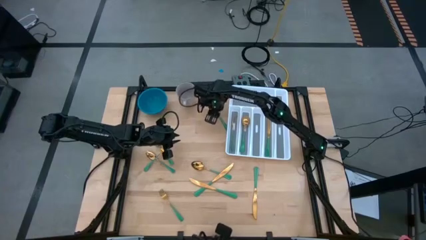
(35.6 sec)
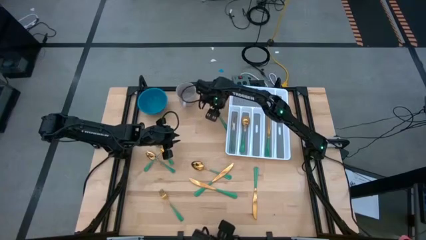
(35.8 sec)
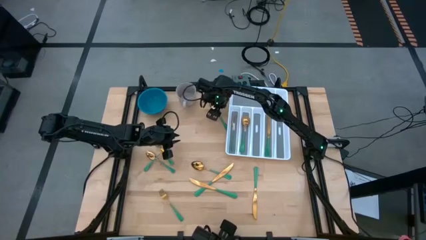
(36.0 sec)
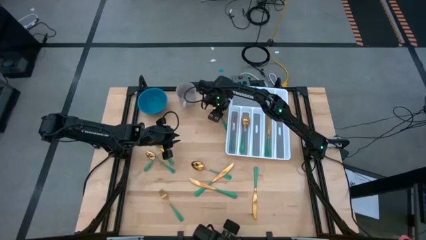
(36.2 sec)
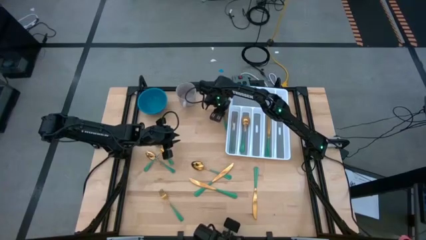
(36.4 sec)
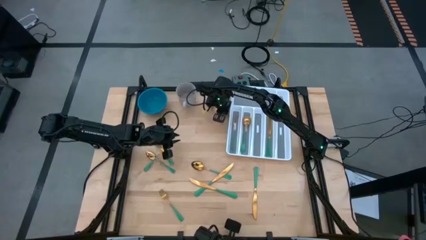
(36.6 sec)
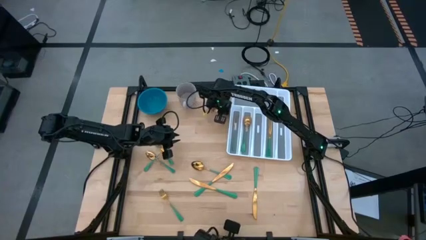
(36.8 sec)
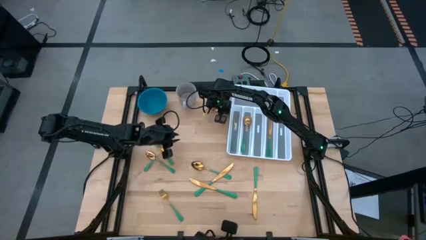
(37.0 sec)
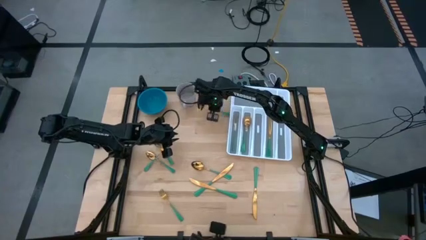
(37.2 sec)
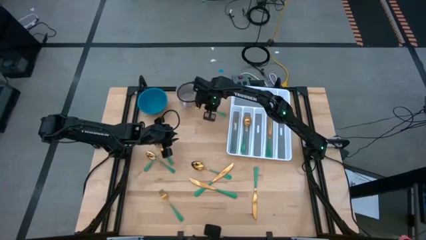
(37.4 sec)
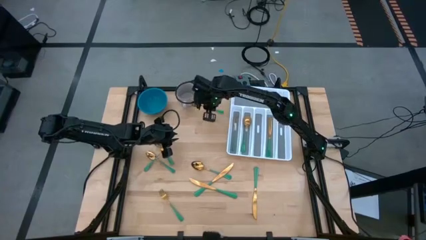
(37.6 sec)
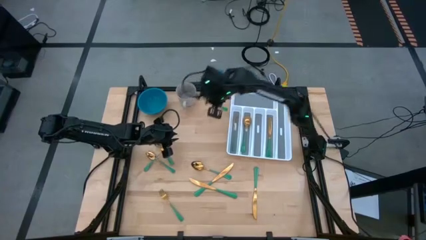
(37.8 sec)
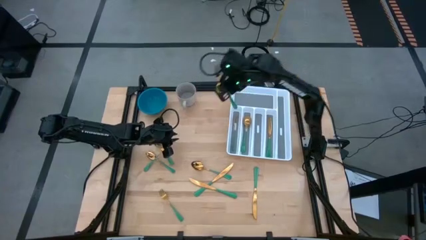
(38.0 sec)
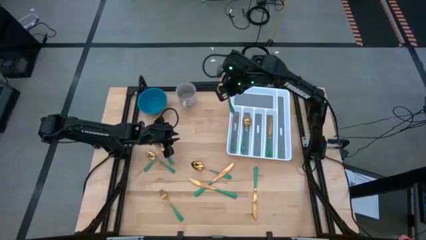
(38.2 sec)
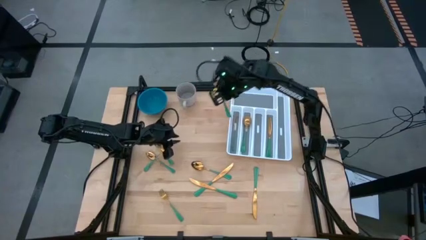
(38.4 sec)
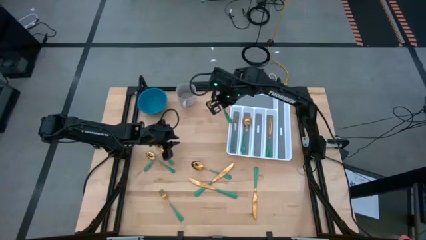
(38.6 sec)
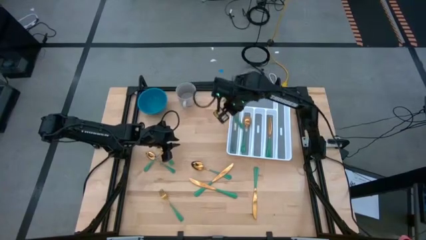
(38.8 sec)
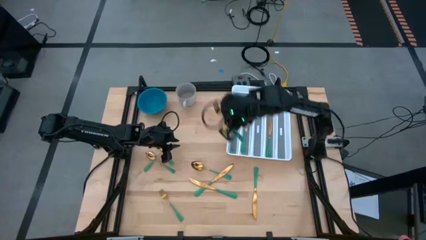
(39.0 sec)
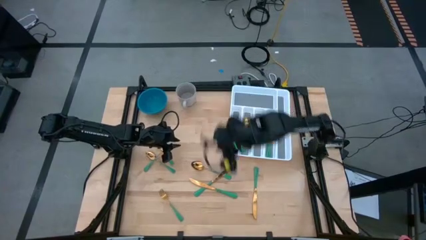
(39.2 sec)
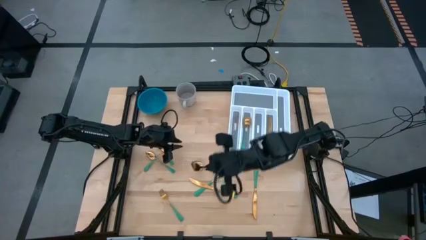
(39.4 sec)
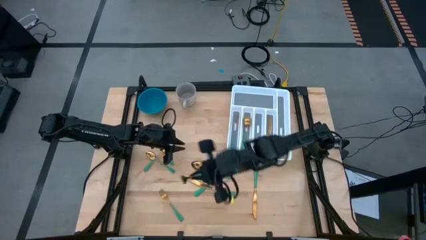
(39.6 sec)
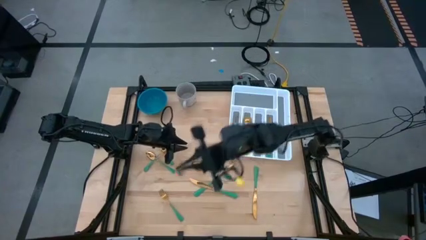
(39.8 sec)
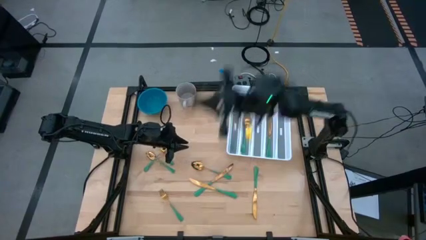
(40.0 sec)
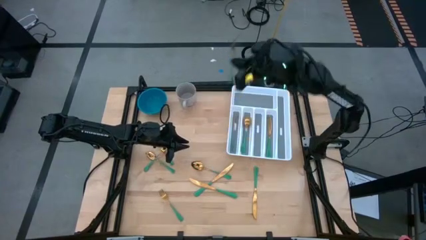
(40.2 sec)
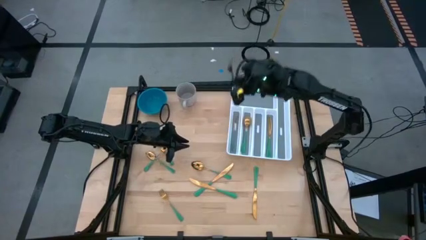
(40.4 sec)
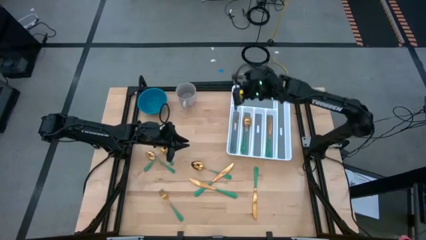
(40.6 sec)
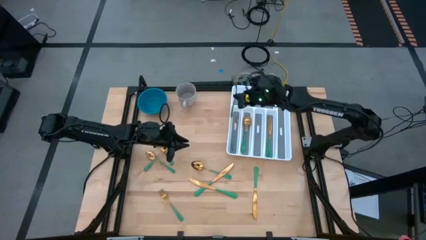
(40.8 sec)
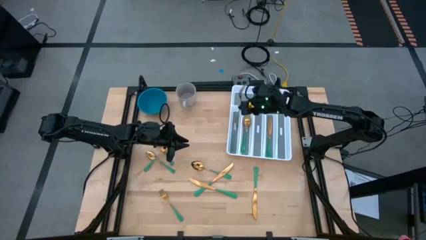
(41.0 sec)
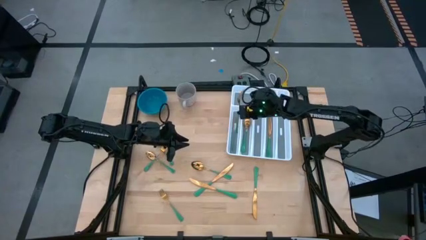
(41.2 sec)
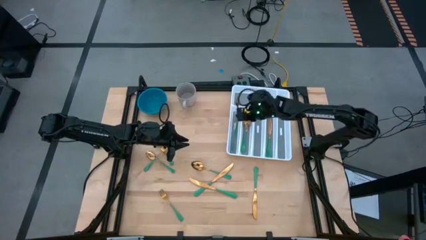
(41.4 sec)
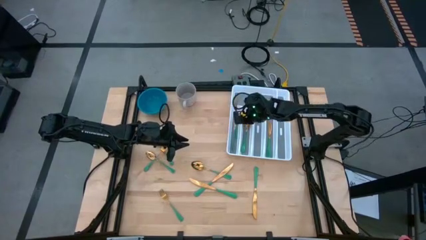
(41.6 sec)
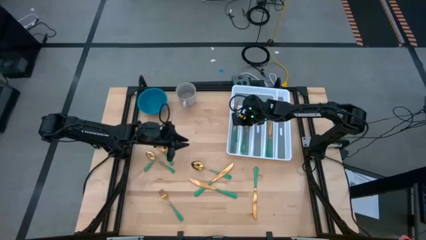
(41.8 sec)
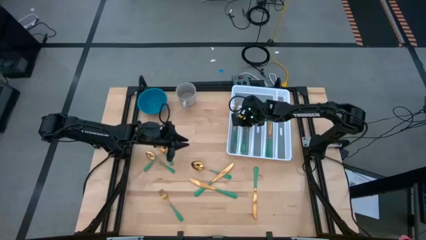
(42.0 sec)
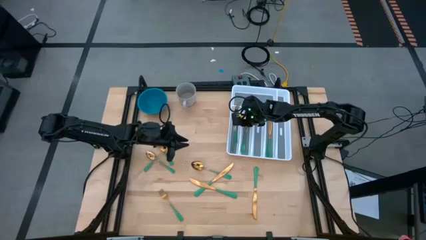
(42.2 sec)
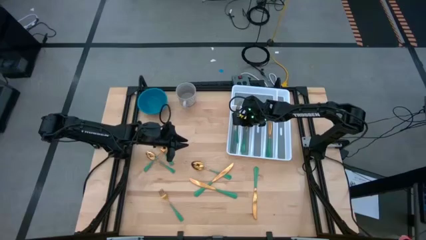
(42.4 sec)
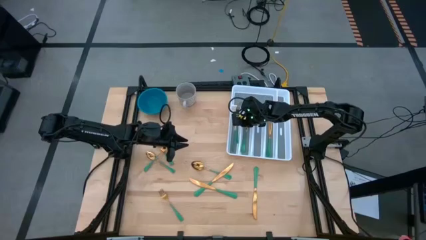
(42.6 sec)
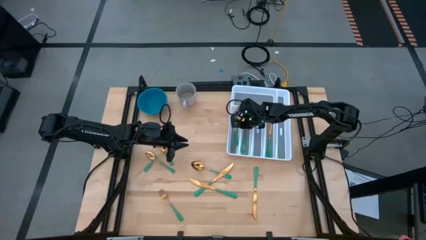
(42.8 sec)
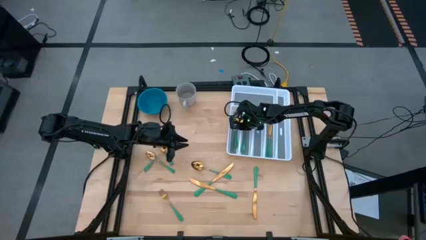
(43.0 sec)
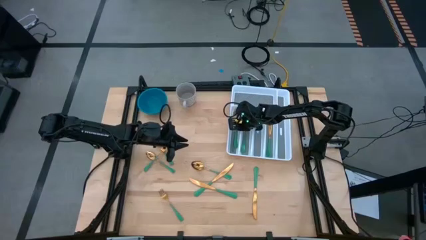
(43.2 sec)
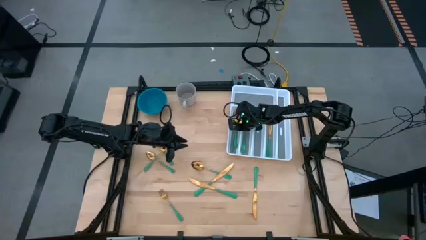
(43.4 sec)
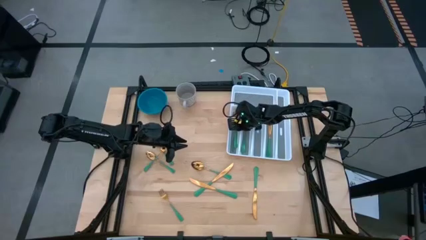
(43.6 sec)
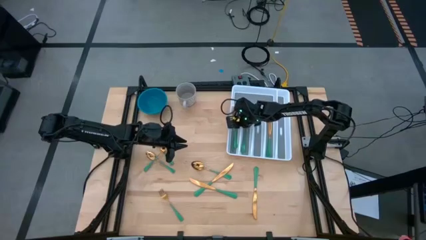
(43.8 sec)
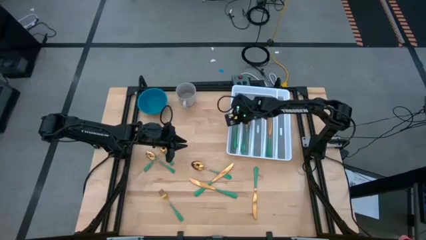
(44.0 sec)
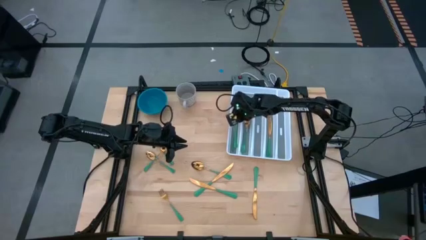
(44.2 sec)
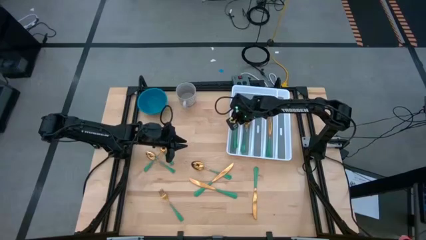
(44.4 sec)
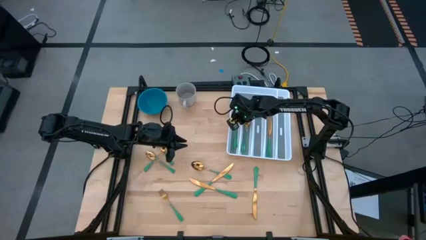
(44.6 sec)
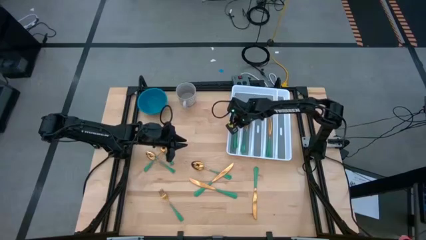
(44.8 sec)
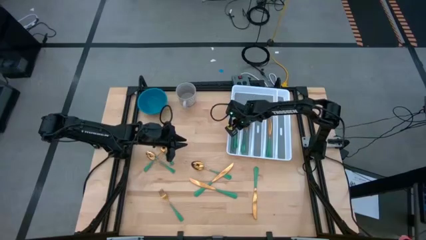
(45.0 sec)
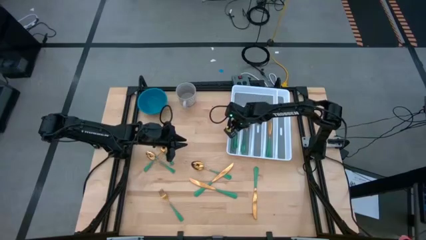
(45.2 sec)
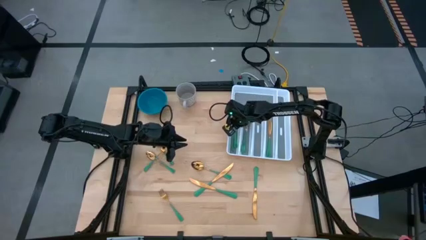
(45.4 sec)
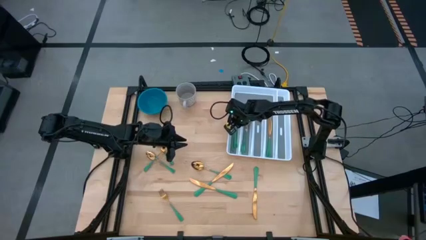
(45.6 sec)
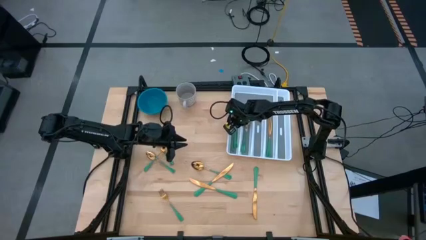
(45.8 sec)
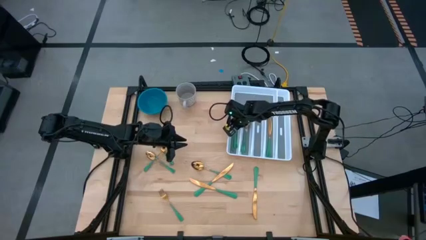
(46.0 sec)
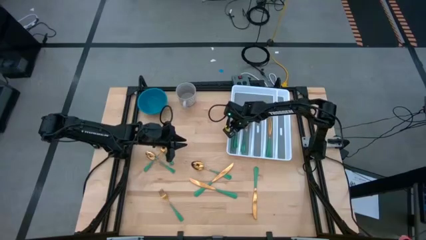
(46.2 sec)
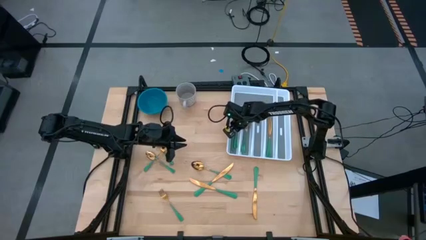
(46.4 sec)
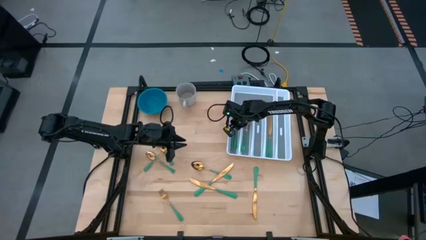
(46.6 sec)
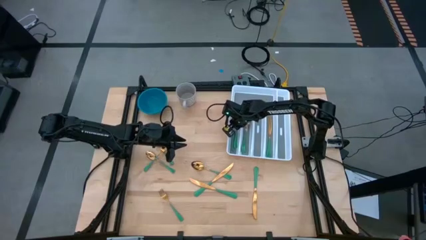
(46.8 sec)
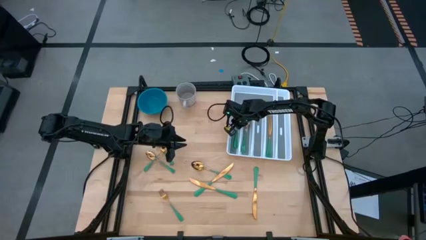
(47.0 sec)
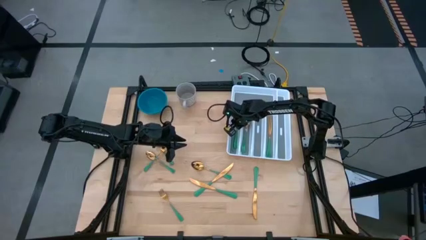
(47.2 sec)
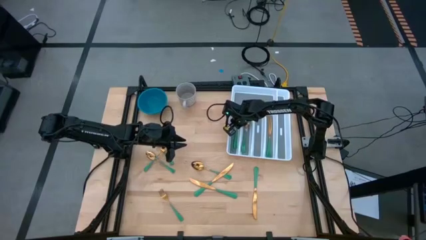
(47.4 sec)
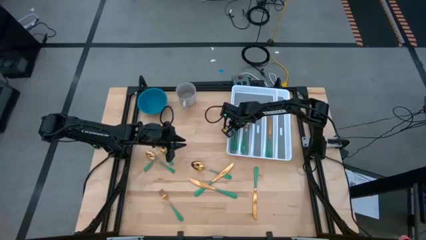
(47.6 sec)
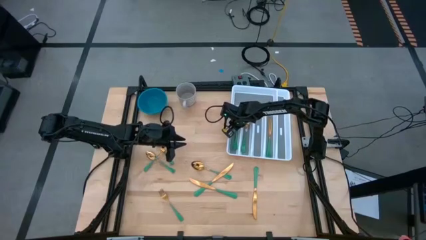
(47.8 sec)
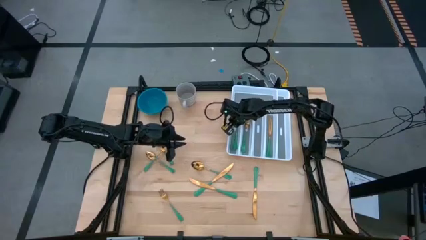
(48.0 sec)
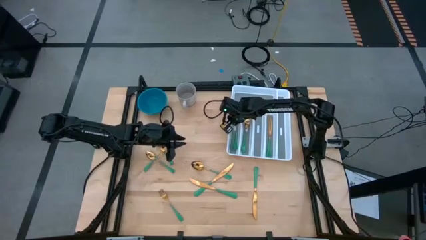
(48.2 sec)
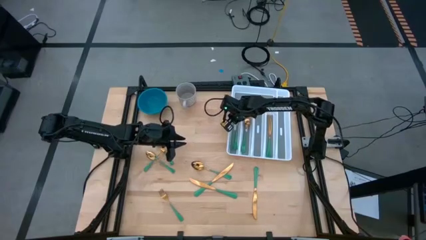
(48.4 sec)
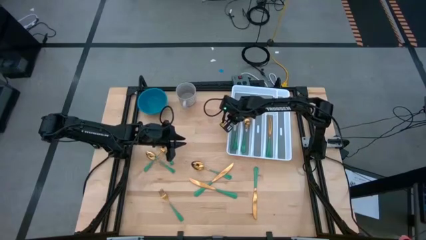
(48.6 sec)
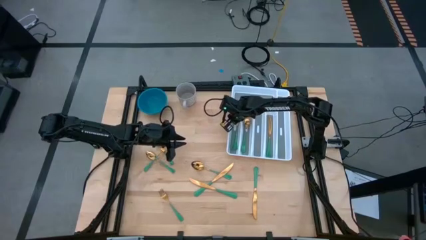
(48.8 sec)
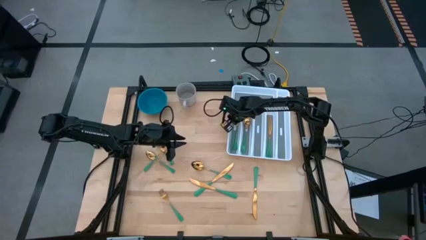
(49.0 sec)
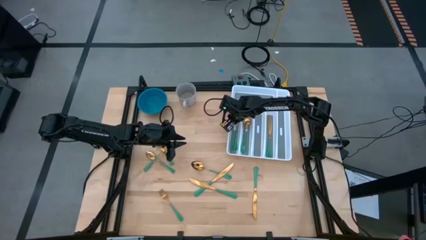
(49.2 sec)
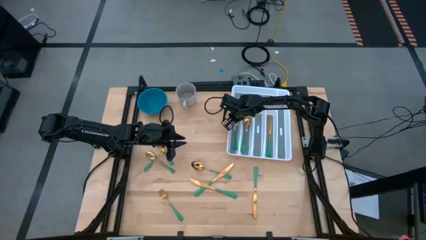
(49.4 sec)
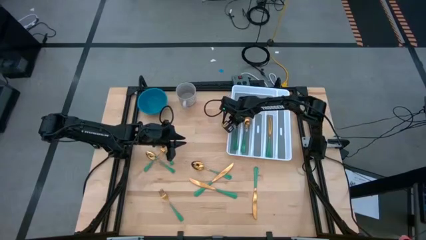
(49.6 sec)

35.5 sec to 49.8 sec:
Task: Sort silverware
Put the green fork into the white silverware organizer

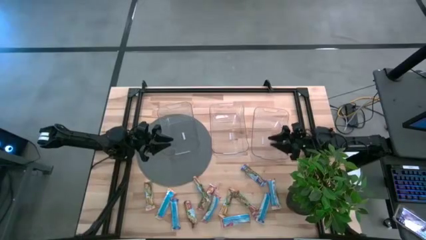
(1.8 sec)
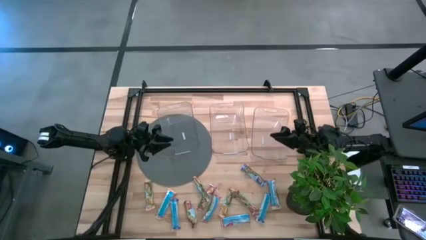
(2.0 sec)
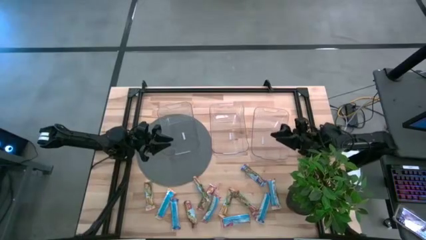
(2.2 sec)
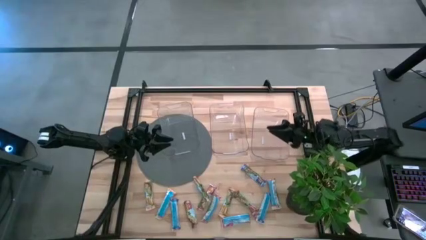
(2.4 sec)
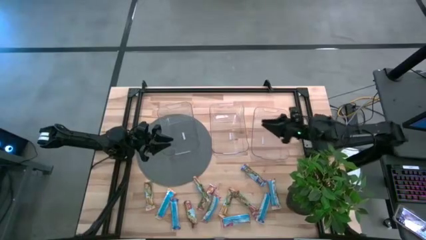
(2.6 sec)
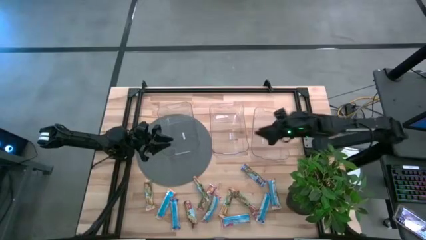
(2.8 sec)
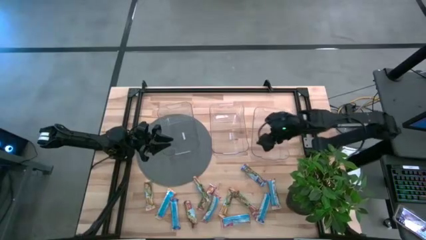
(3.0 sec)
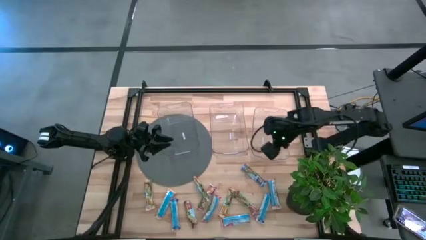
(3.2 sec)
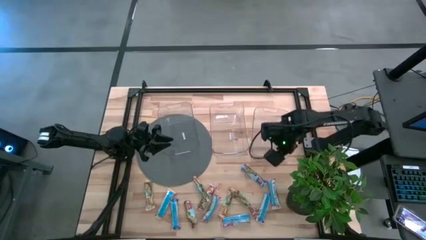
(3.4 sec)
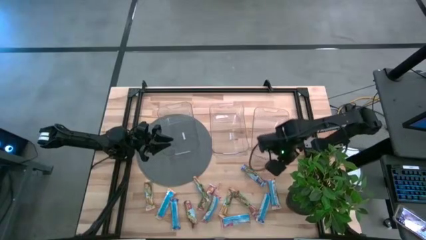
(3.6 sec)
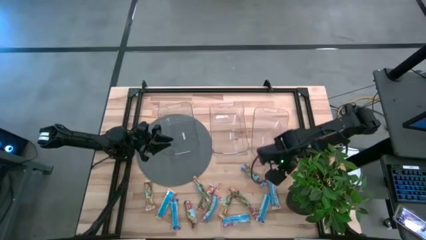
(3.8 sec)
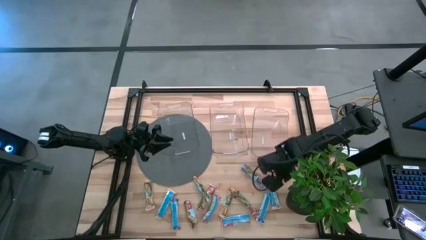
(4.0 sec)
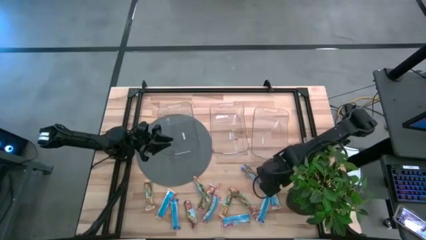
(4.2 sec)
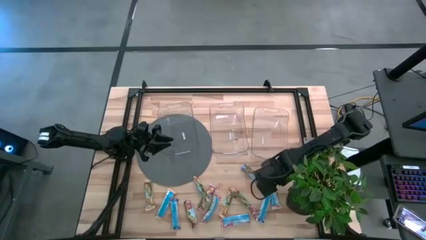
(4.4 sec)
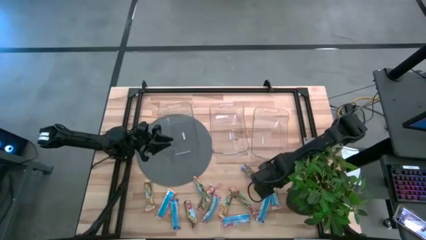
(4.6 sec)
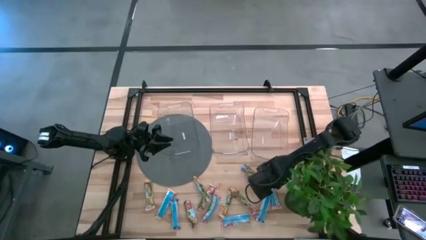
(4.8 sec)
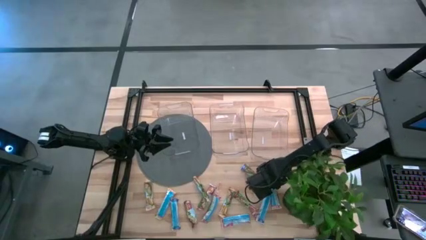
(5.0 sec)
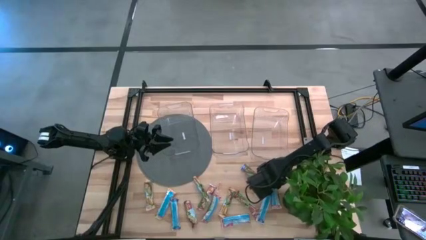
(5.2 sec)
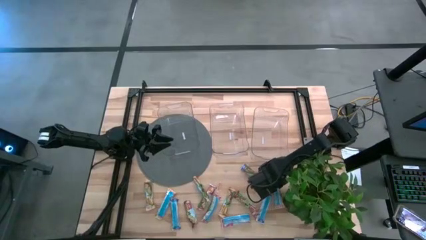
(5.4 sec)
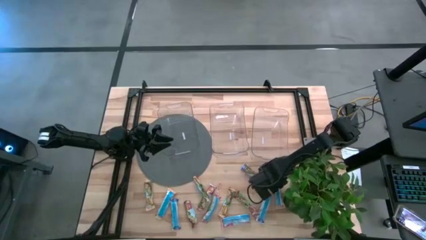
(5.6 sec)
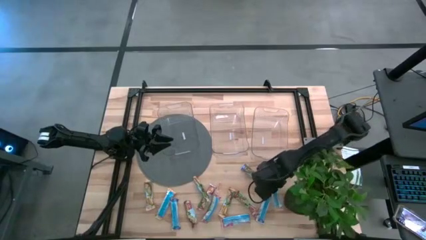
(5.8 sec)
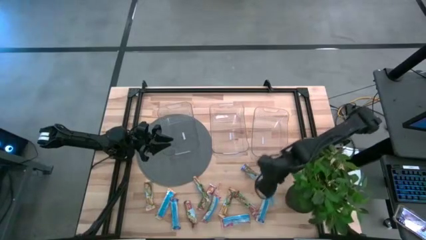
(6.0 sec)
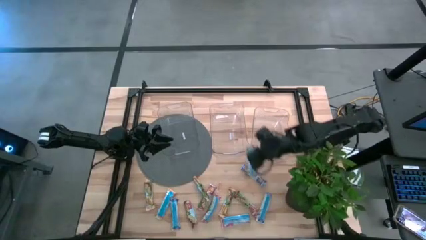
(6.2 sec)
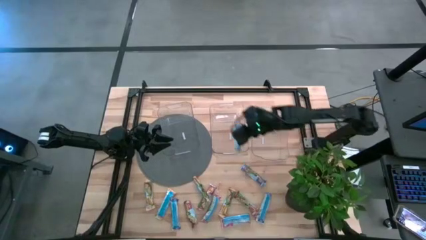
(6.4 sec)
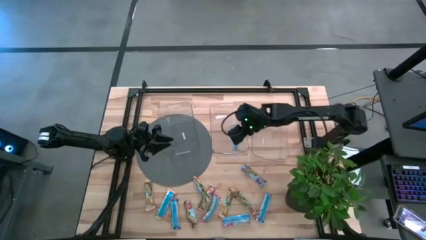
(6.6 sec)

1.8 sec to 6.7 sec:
Task: Pick and place Granola Bars by type
Put the yellow granola bar into the middle transparent bin
